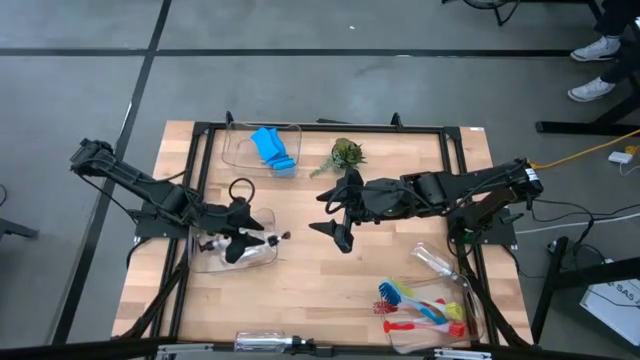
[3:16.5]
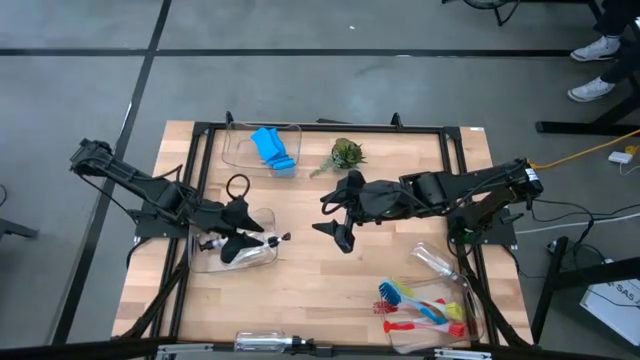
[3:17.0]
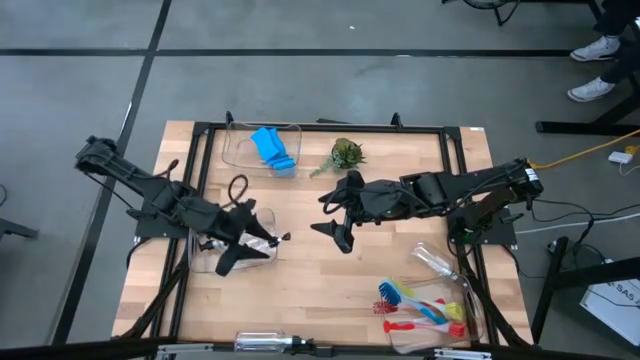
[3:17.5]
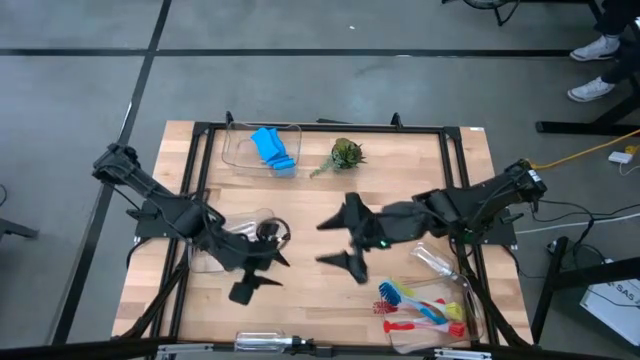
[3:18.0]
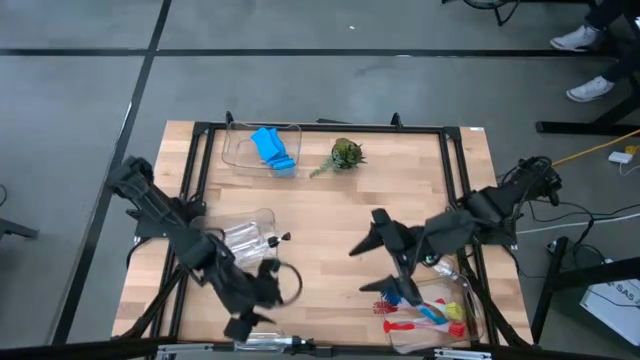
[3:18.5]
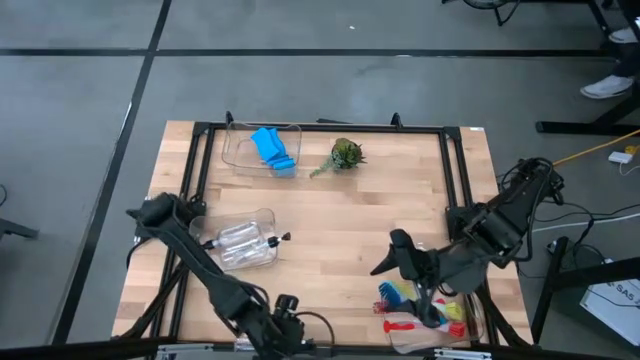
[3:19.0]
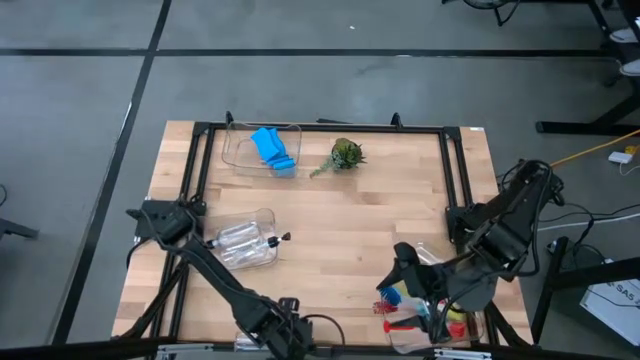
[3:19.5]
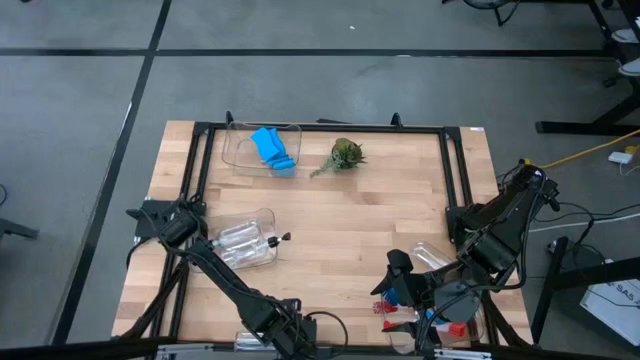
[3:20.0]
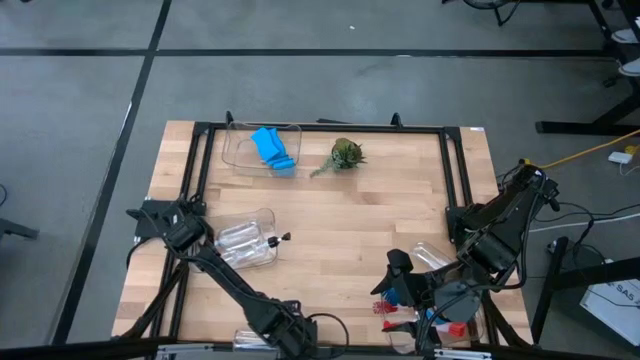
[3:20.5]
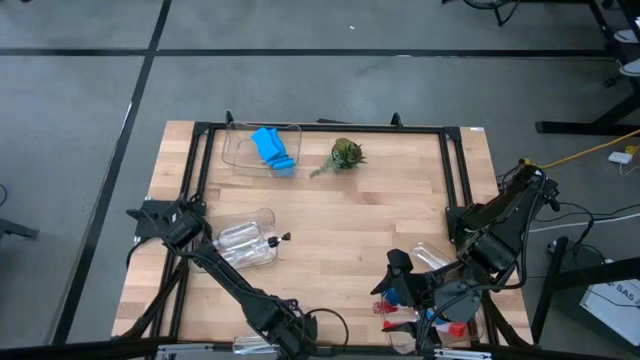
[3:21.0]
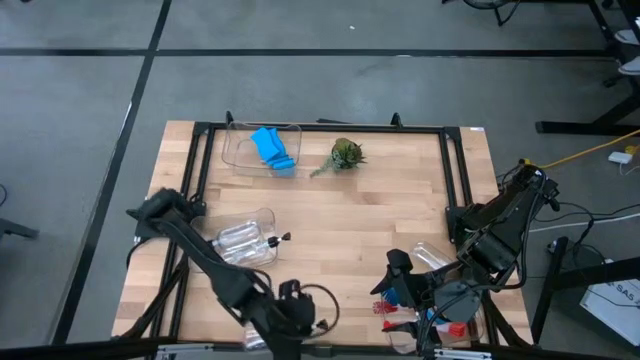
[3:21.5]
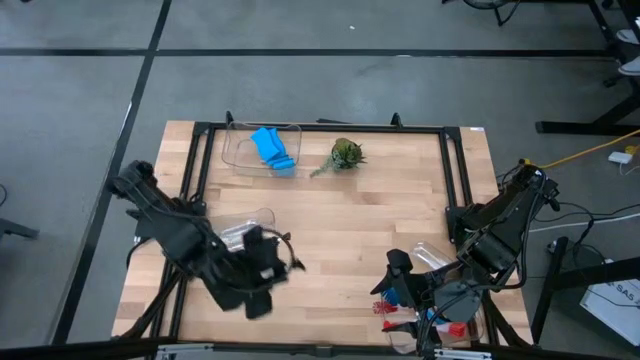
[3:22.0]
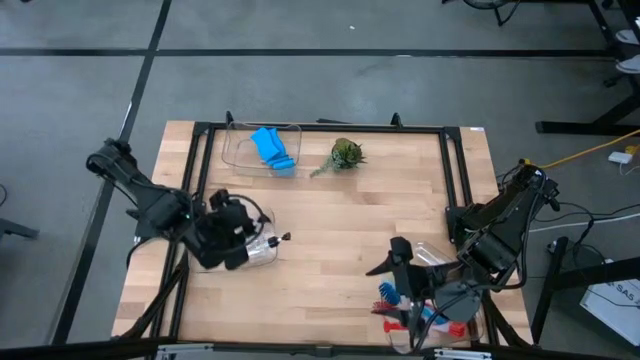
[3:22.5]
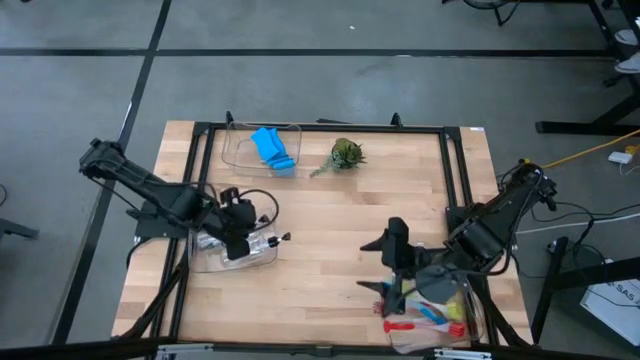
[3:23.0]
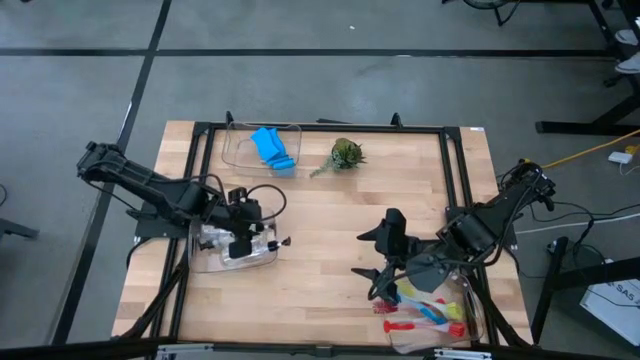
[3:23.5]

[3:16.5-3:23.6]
Task: Pick & Place Kitchen Sink Supplies
Put the transparent soap dispenser into the middle transparent bin

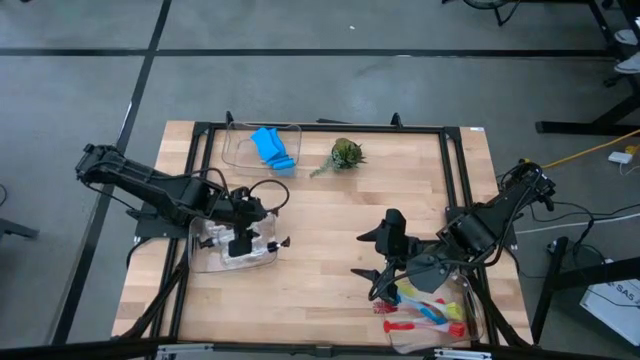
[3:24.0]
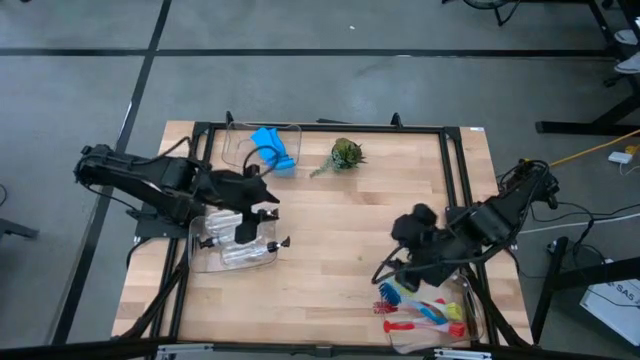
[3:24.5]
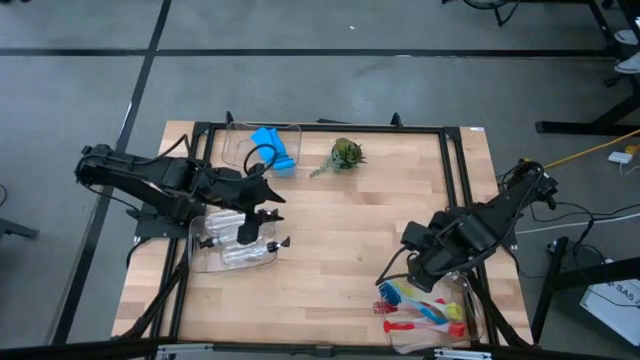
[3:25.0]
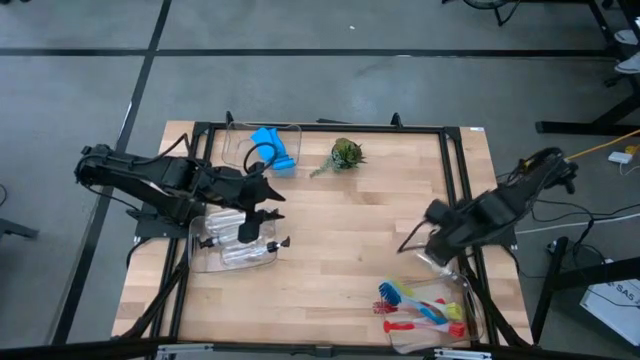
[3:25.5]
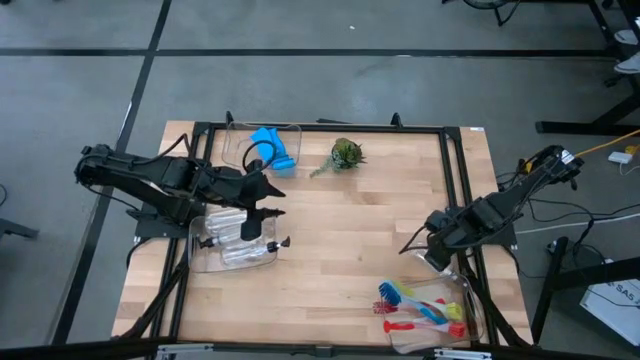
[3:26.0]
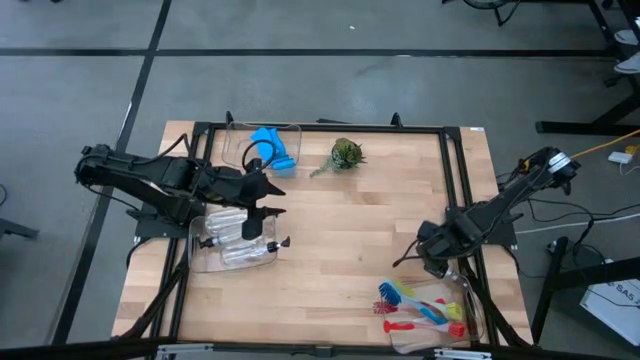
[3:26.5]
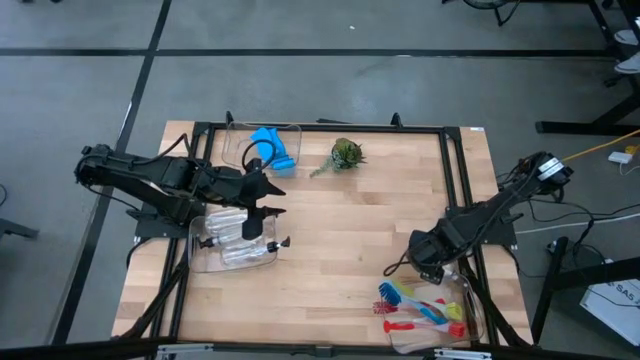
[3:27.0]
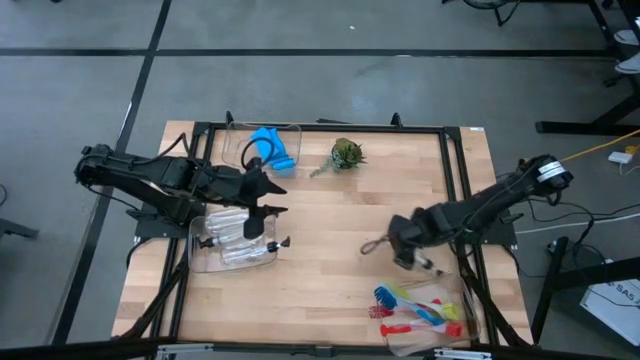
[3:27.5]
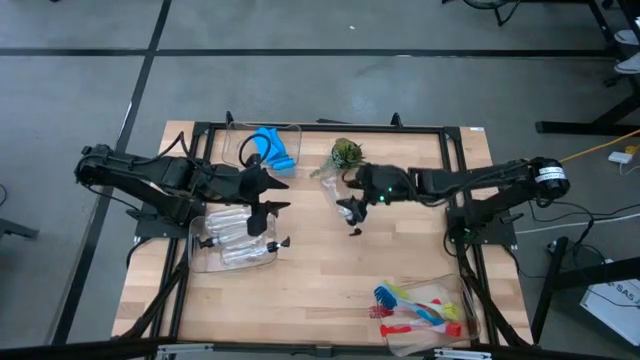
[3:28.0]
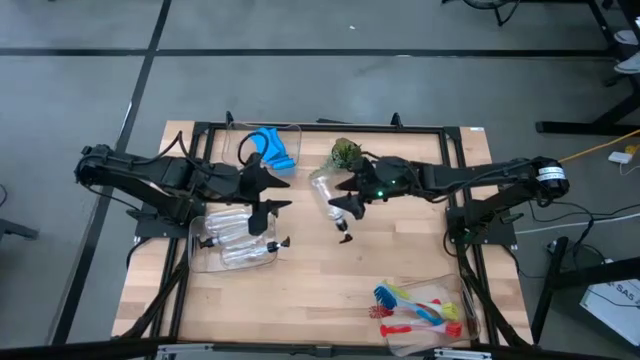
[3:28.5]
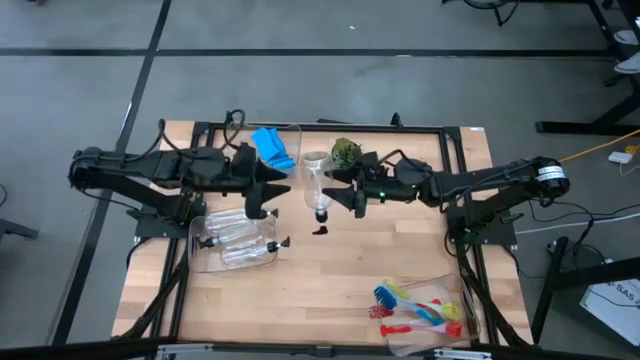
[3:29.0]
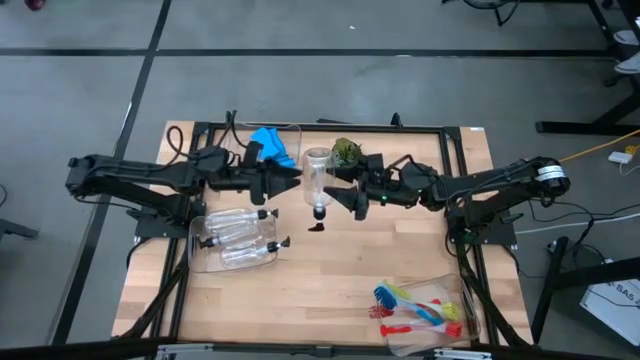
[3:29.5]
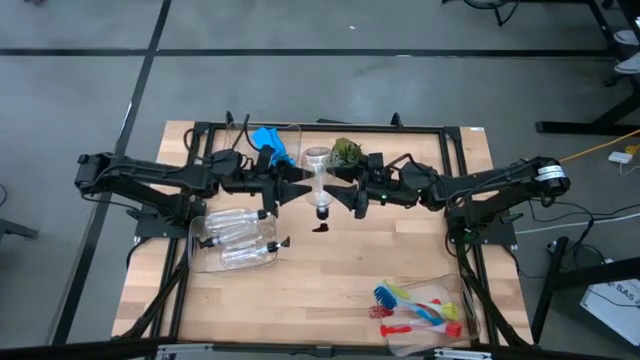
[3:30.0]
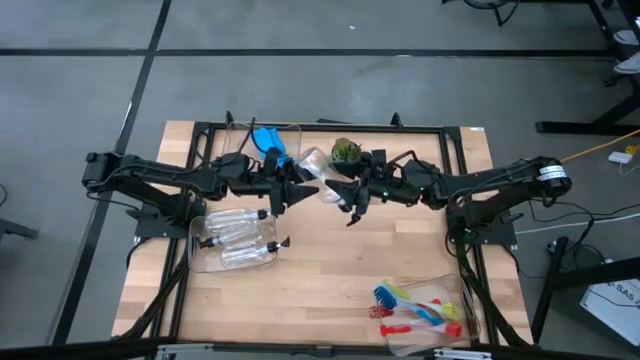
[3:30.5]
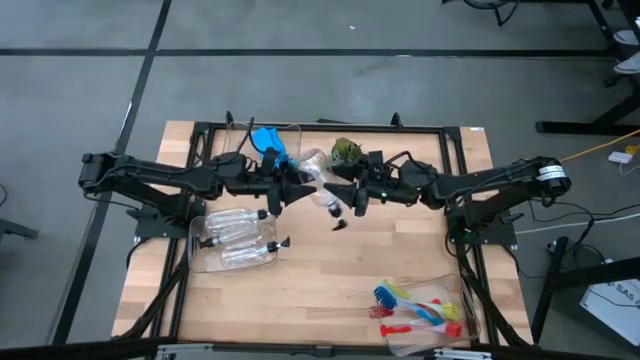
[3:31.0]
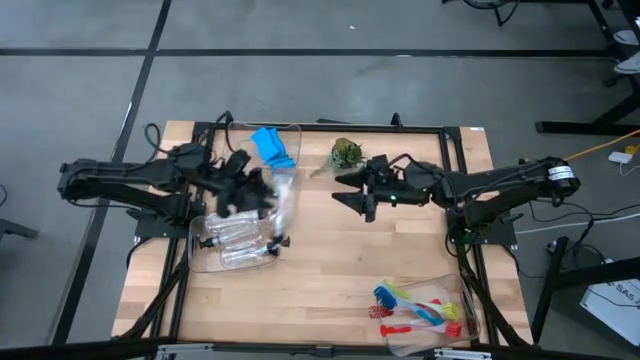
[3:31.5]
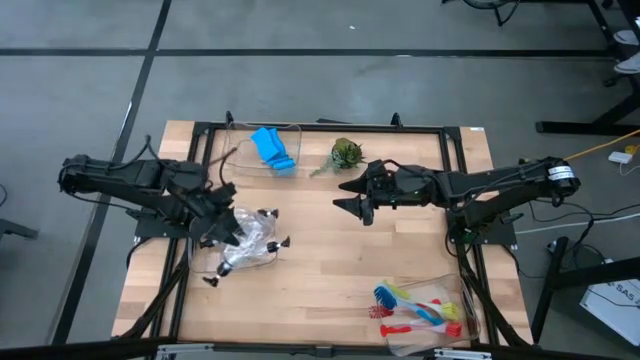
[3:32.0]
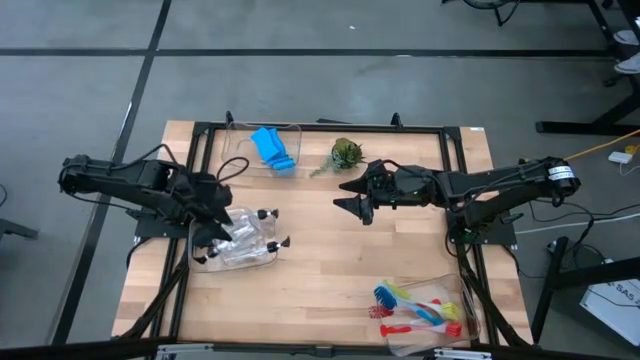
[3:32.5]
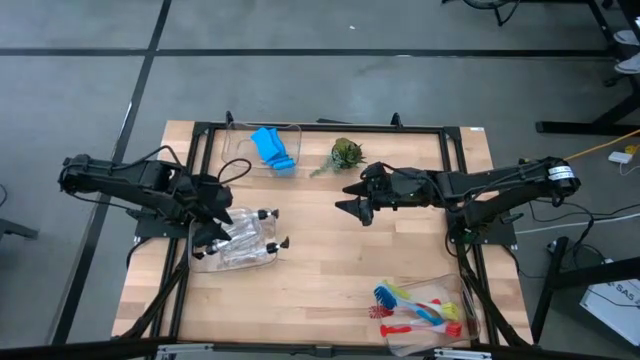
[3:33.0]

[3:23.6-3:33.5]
Put the transparent soap dispenser into the middle transparent bin

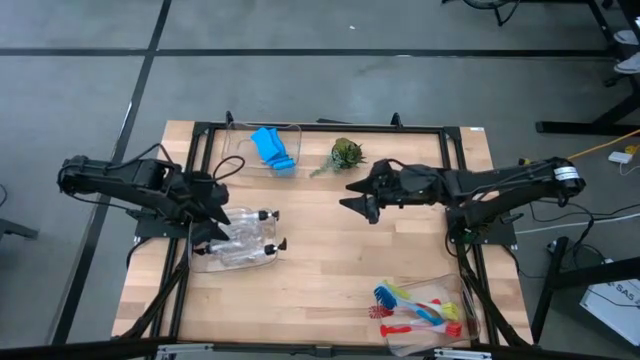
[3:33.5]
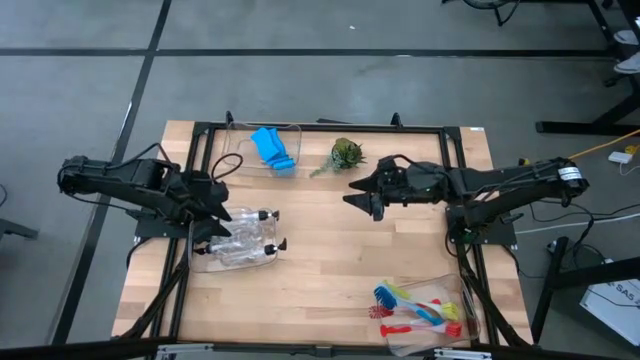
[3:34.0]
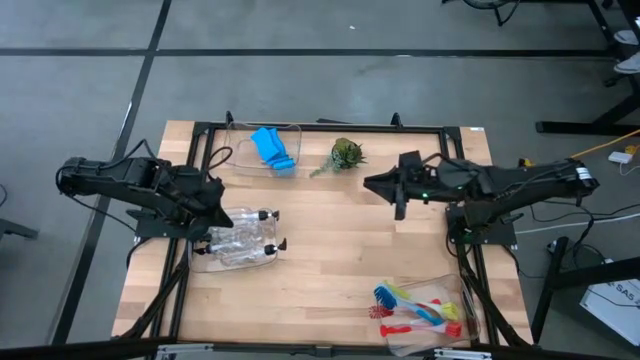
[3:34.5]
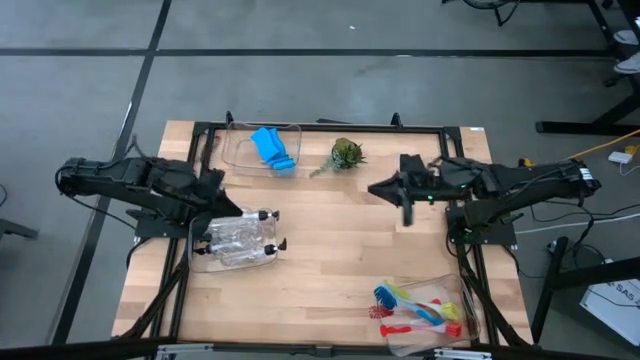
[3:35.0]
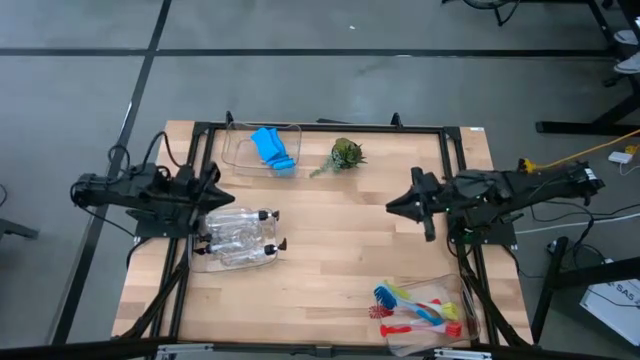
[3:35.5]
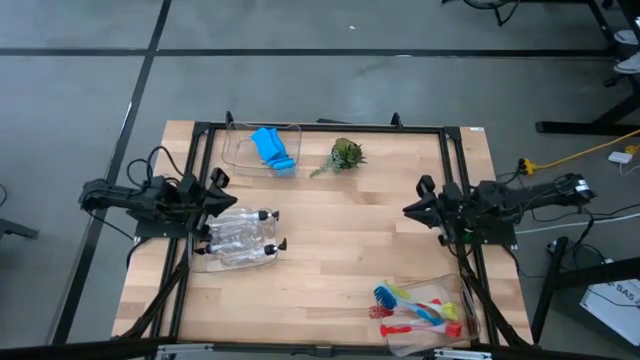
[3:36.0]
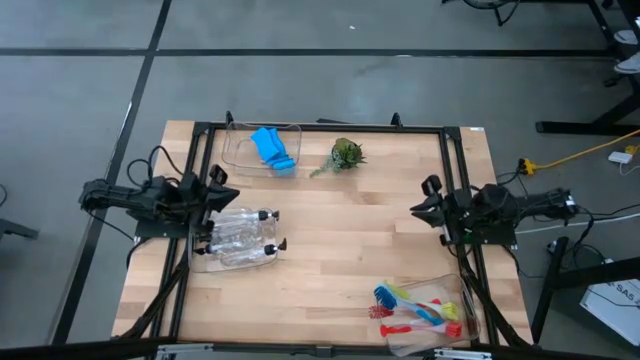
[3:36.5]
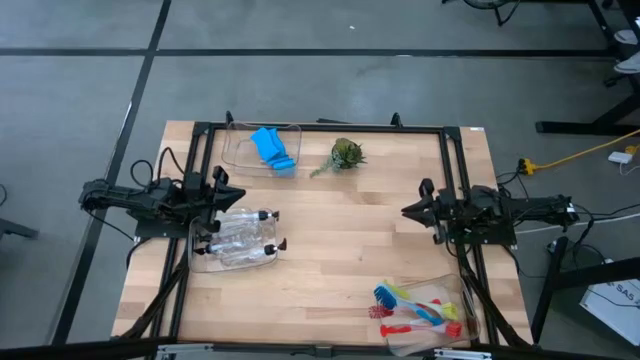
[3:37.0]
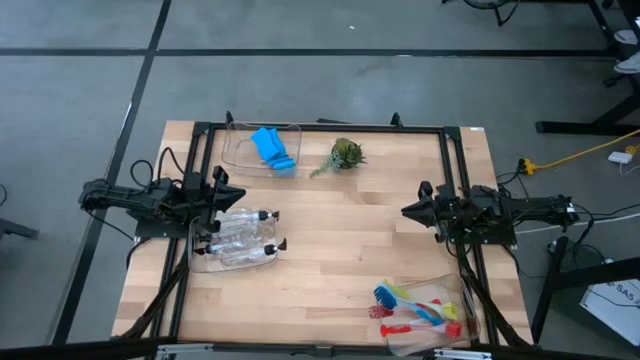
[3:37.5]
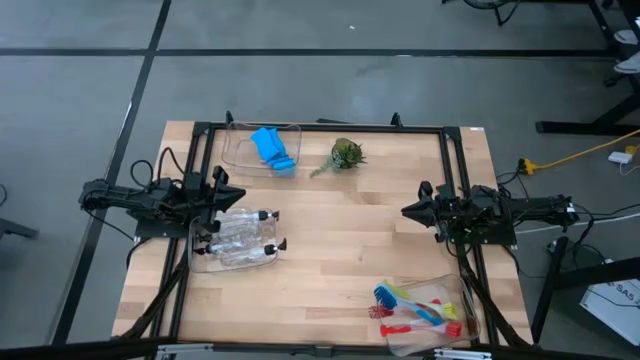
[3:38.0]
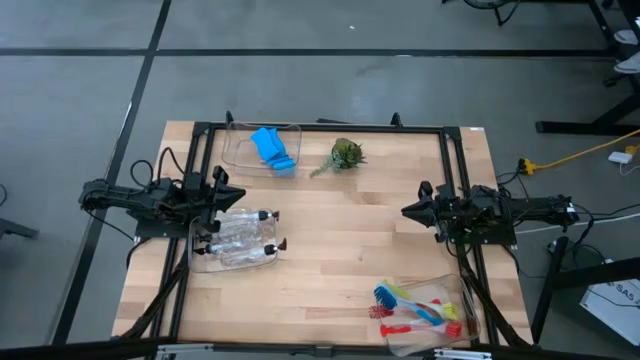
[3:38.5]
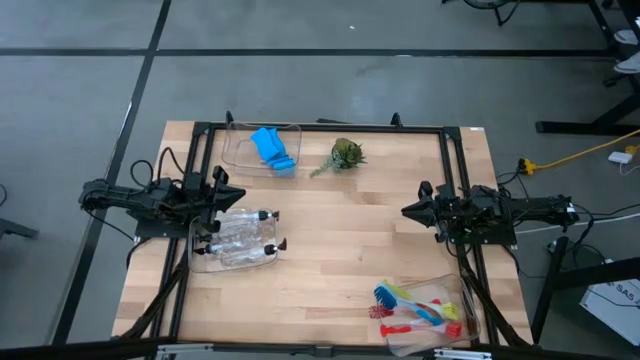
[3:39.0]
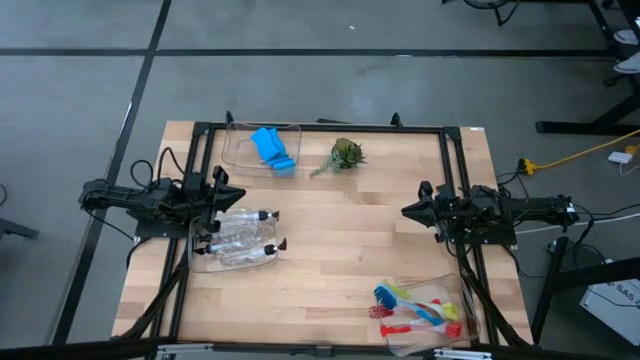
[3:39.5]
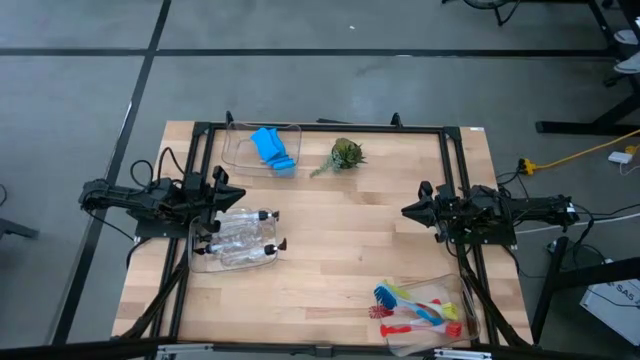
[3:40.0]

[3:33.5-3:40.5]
Return to Home Position
